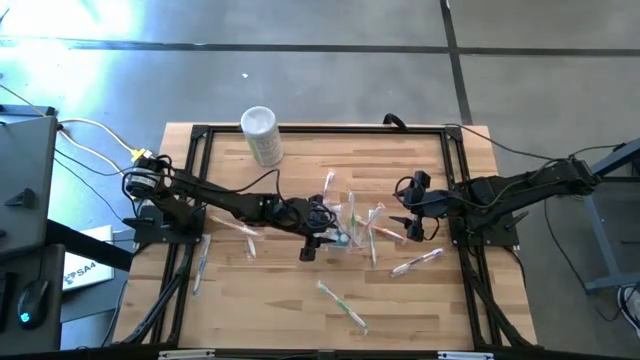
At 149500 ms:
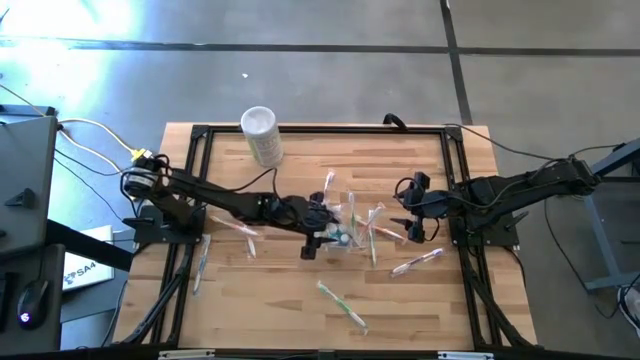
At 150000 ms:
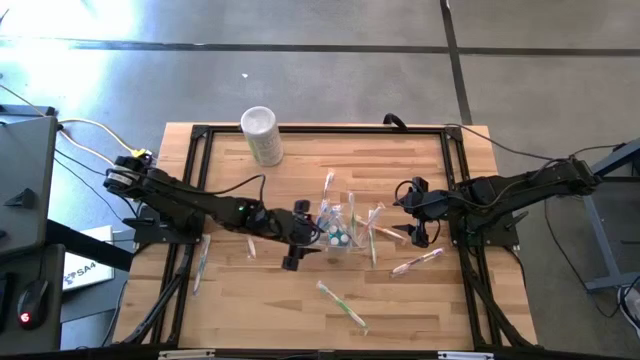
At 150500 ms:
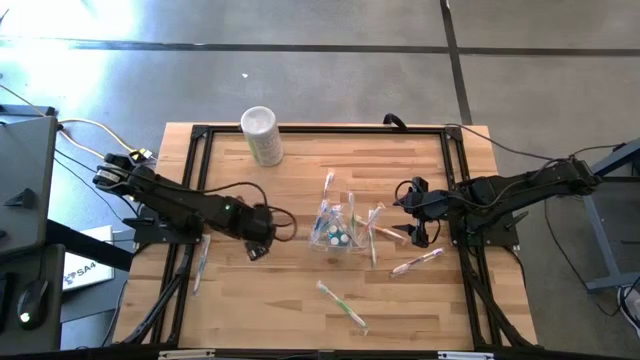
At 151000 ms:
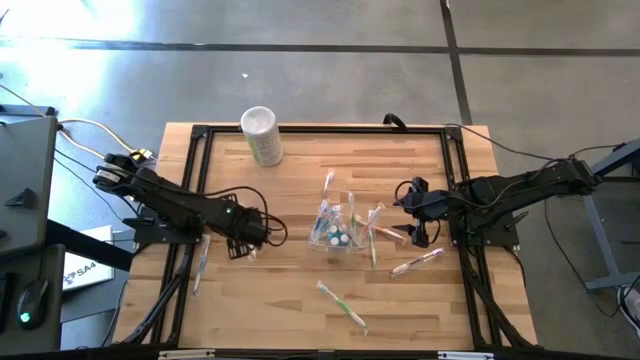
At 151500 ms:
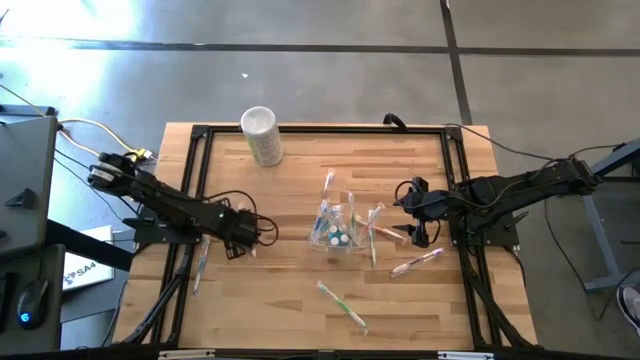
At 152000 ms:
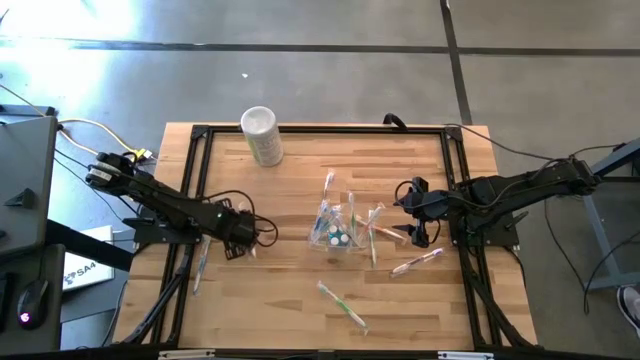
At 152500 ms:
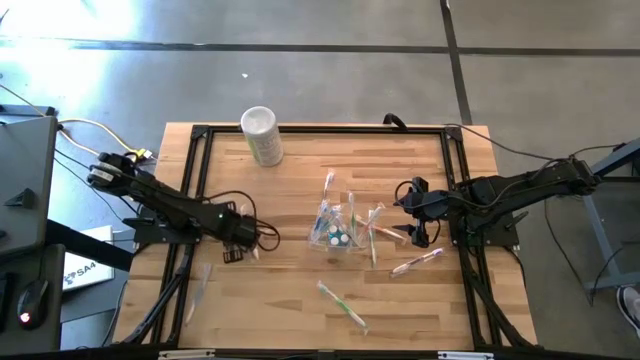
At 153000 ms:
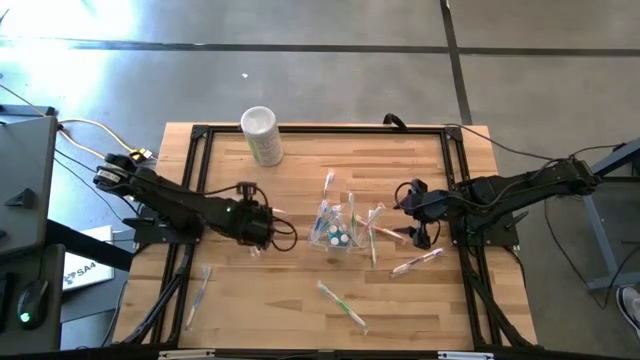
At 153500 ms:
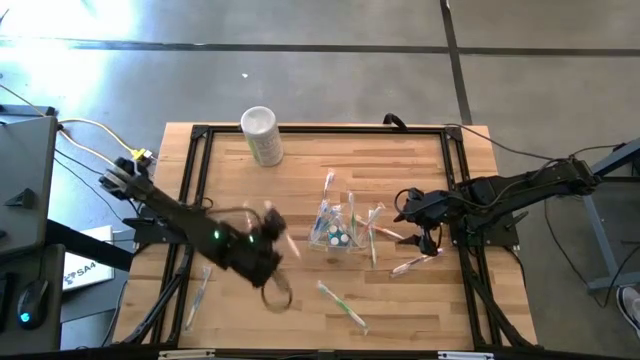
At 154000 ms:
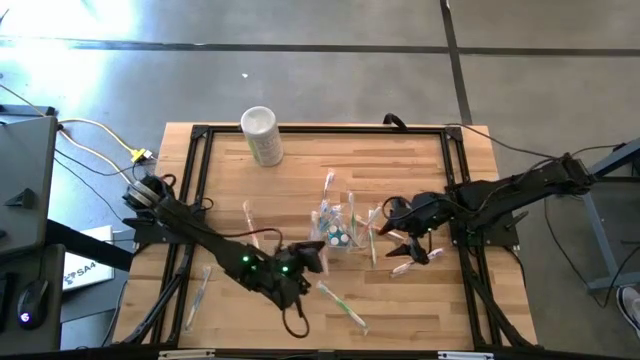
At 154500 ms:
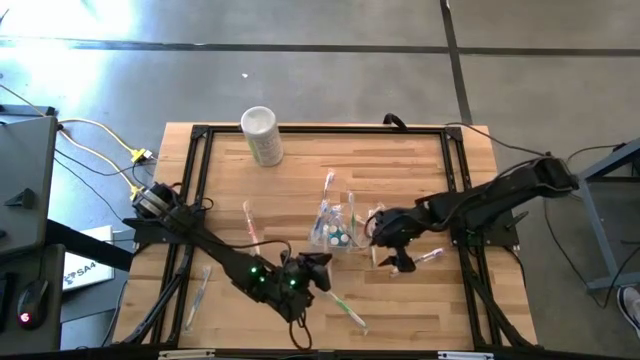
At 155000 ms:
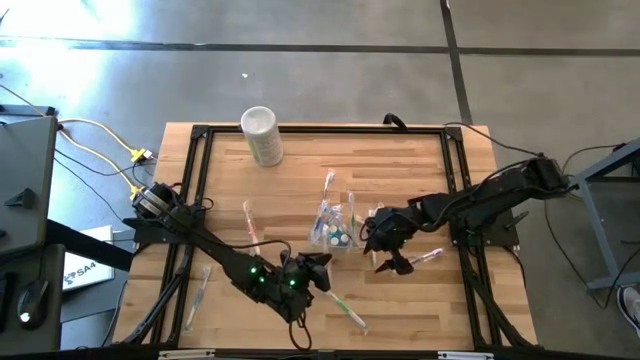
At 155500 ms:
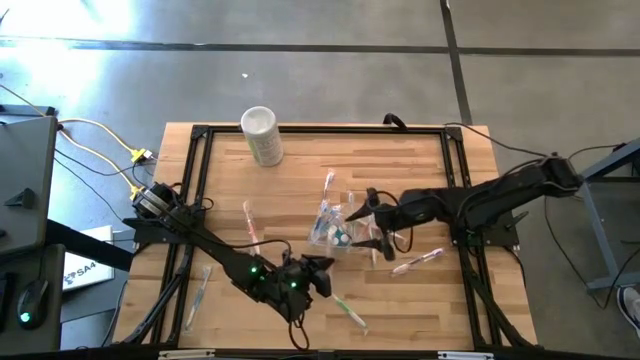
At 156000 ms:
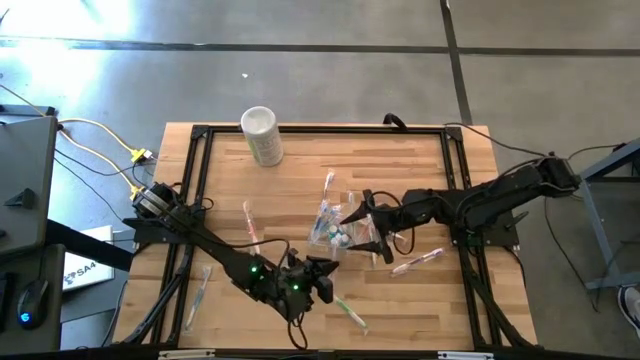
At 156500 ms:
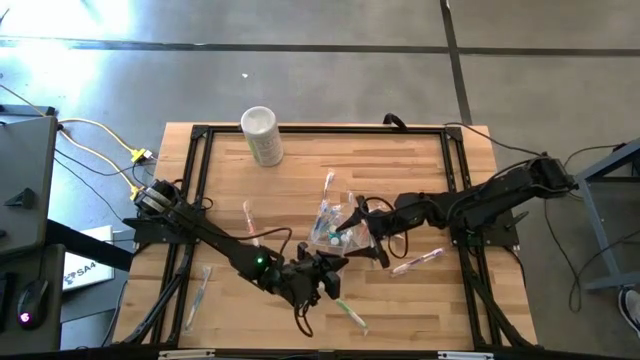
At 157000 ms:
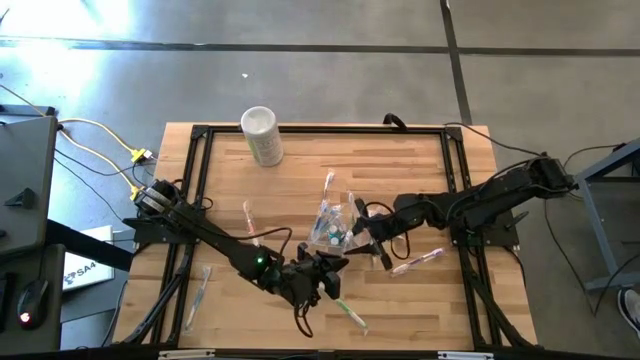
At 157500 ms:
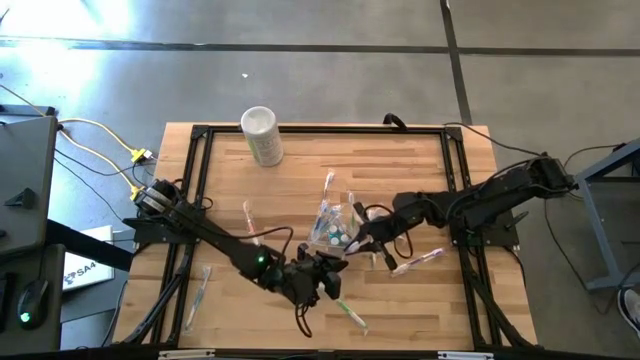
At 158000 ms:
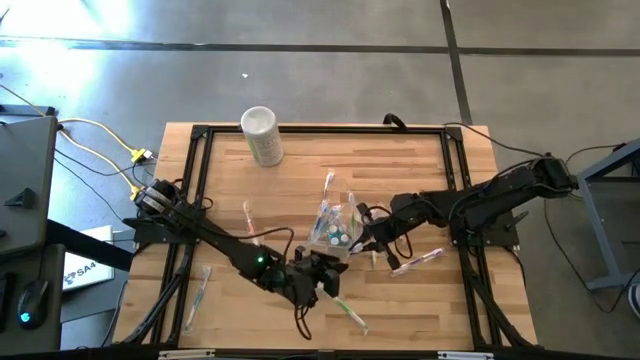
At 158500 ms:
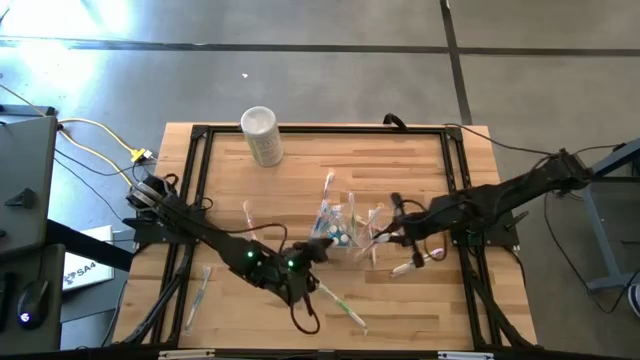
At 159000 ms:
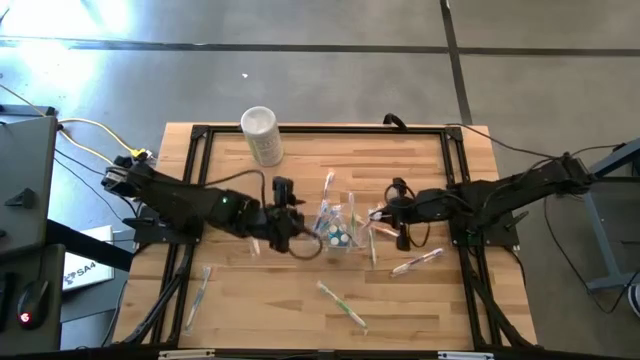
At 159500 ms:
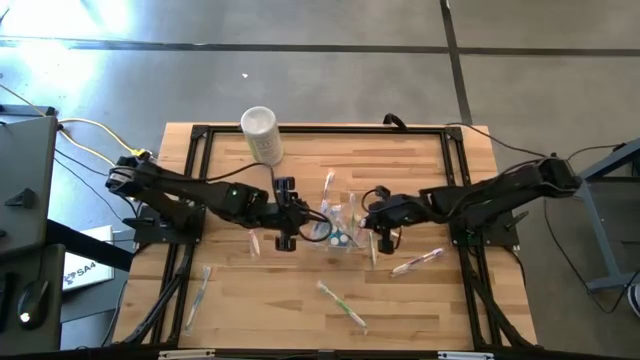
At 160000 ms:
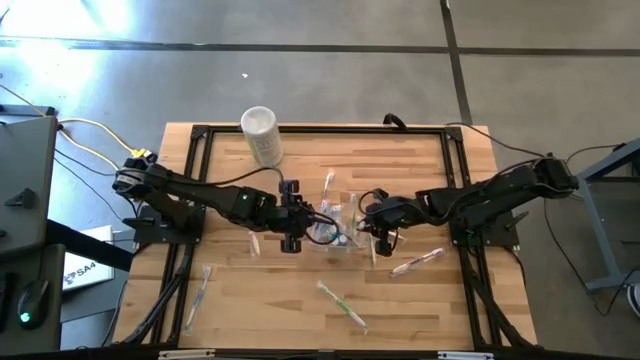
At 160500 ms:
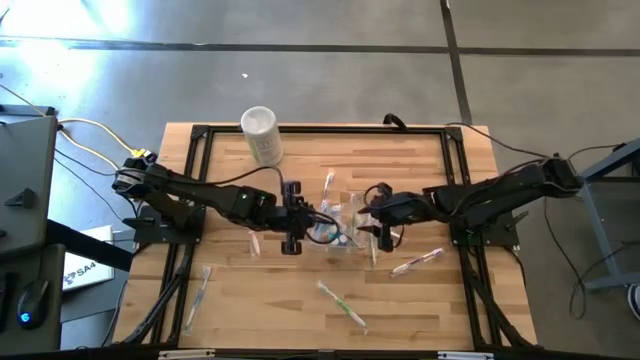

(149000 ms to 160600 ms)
Task: Pick & Place toothbrushing station
Put the orange toothbrush into the right section of the transparent organizer

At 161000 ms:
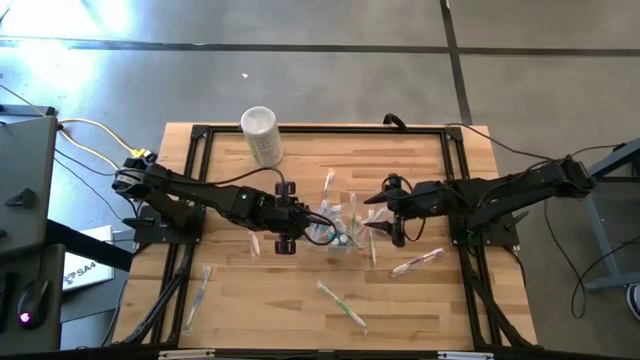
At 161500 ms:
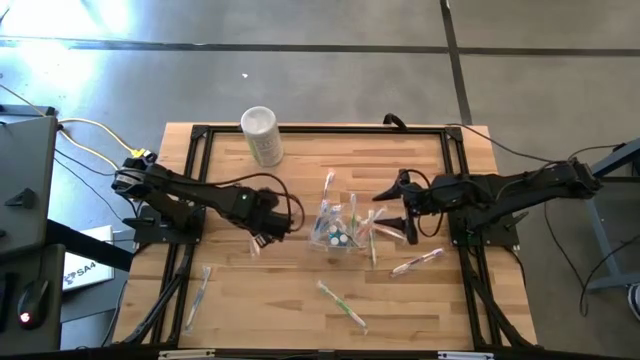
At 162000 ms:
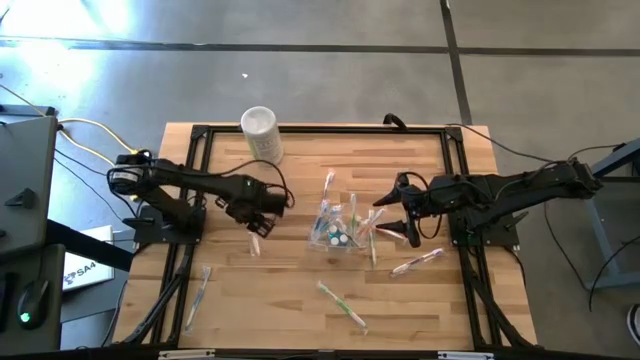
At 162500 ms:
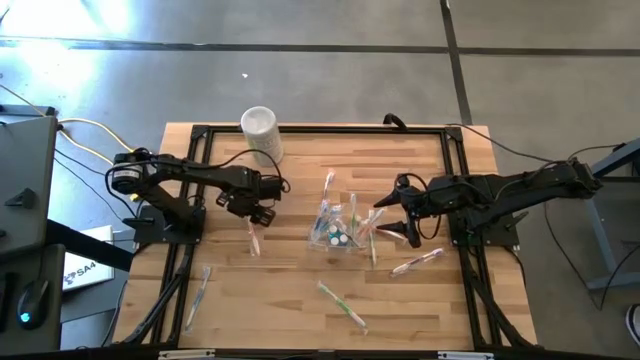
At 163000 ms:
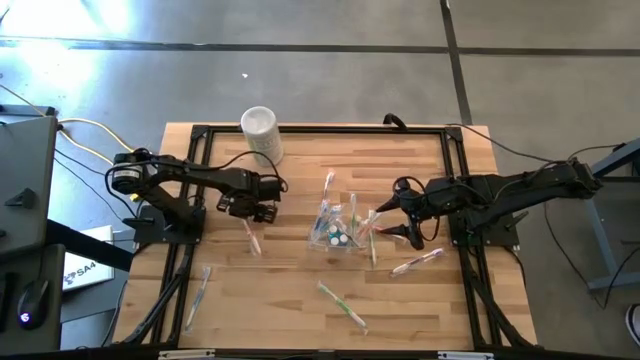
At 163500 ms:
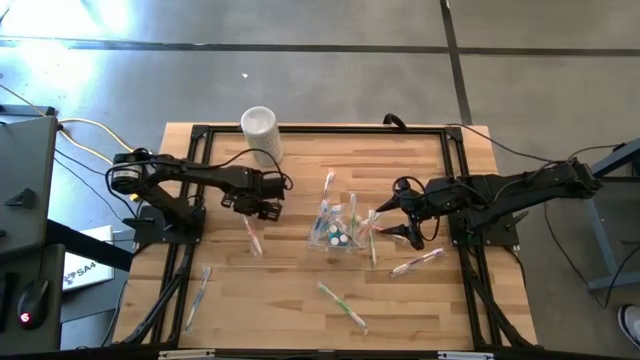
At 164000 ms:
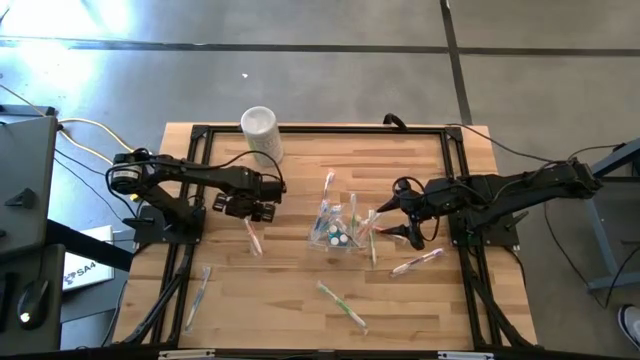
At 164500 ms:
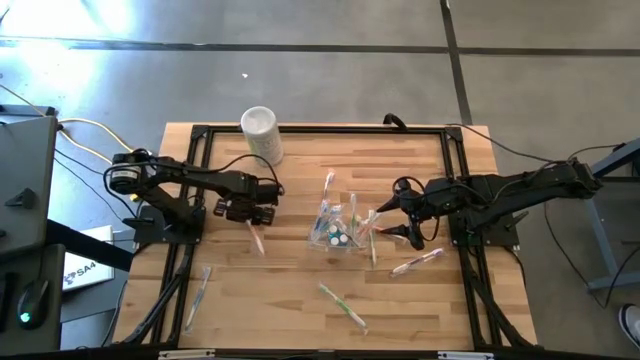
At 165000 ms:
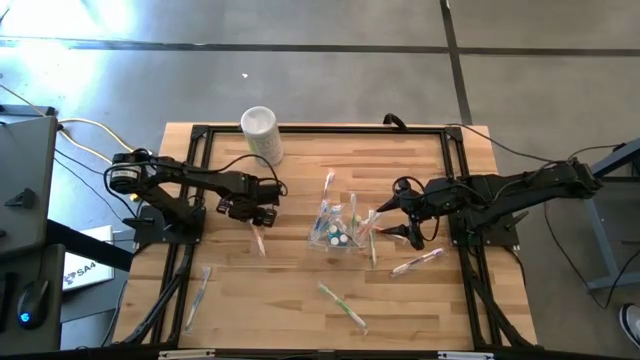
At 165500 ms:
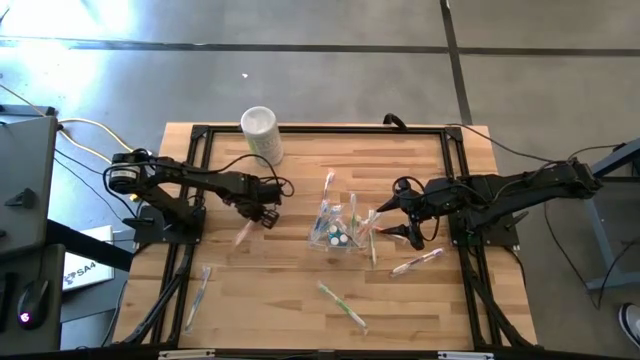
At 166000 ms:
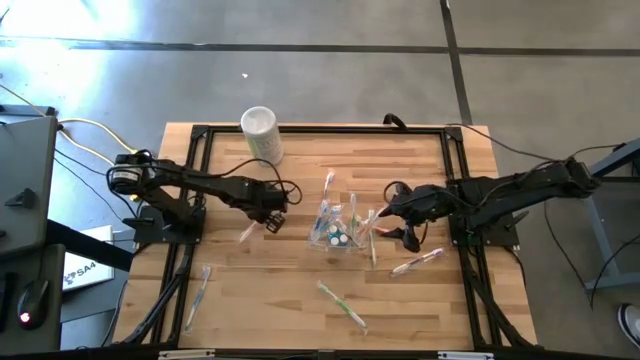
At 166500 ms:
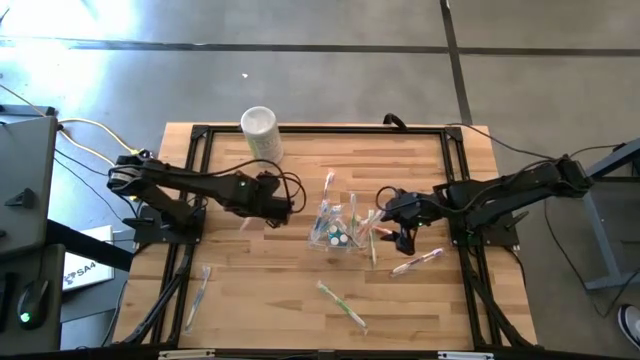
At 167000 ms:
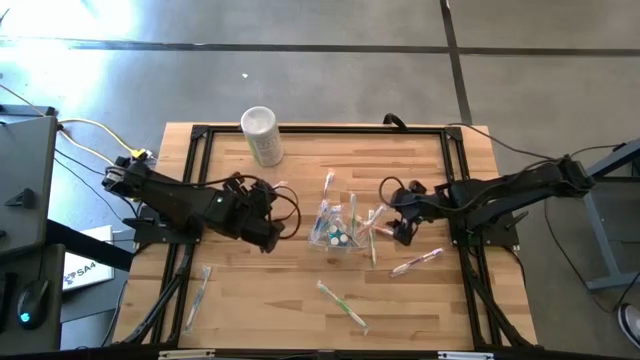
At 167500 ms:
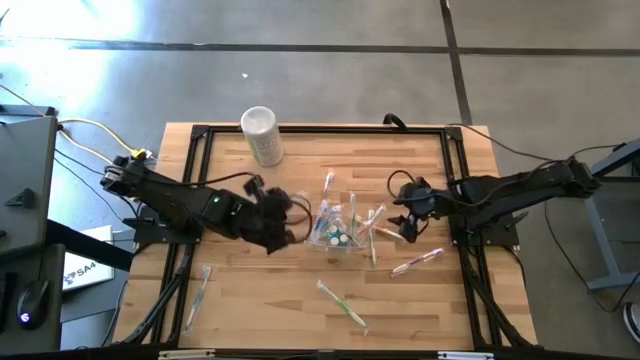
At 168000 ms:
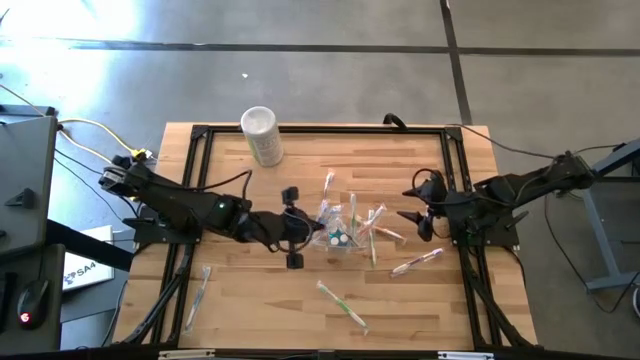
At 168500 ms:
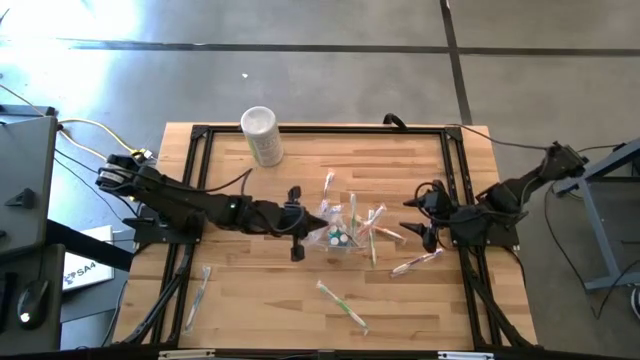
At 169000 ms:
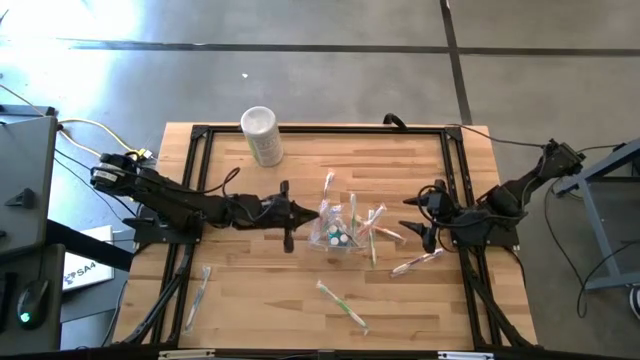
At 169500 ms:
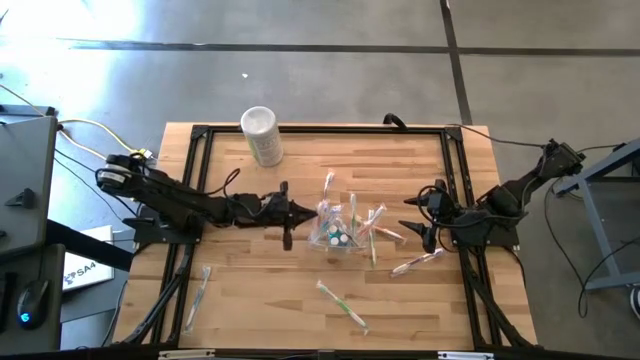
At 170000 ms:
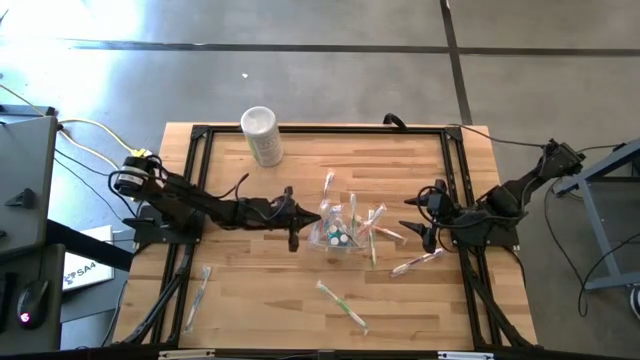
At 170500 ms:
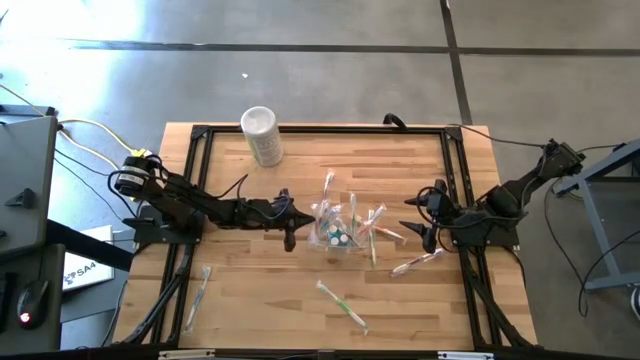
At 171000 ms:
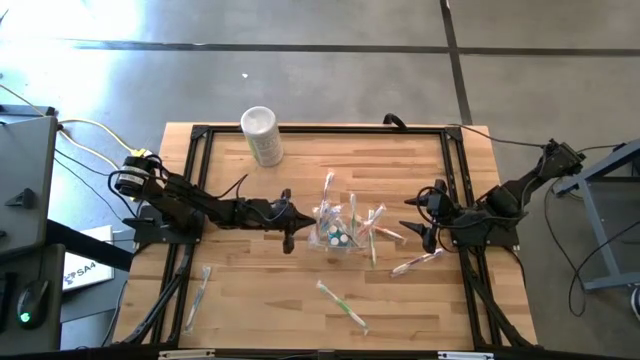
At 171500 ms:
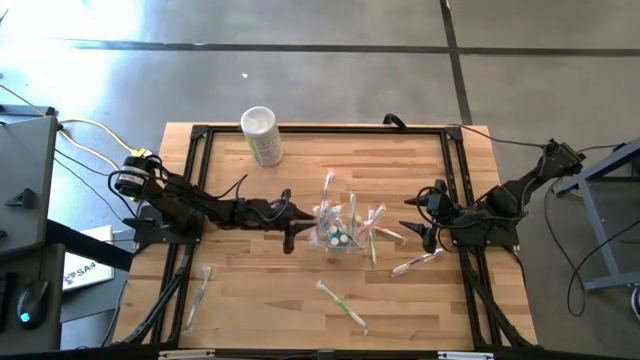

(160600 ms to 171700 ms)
Put the orange toothbrush into the left section of the transparent organizer
